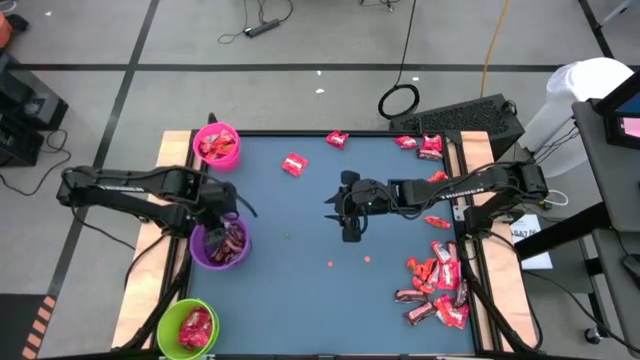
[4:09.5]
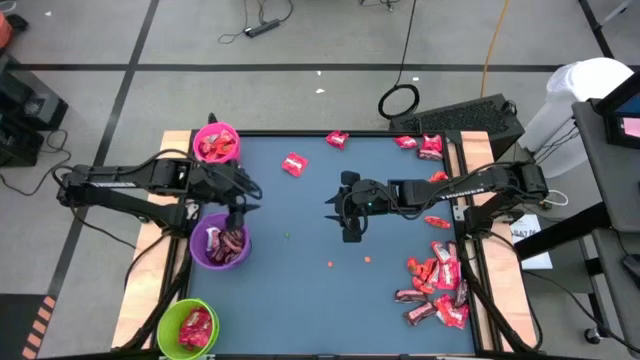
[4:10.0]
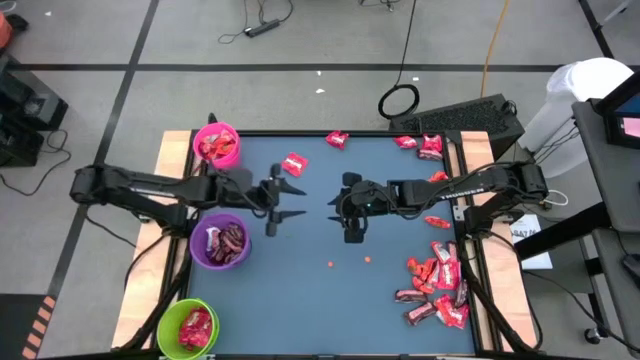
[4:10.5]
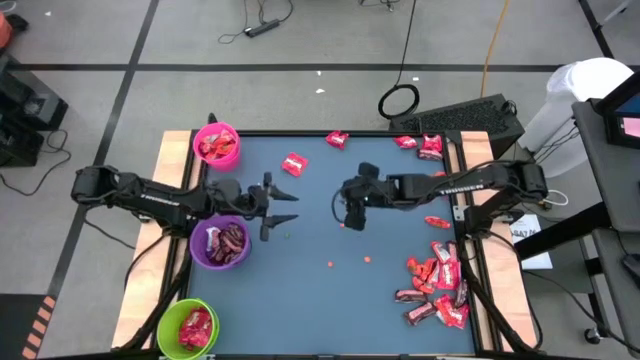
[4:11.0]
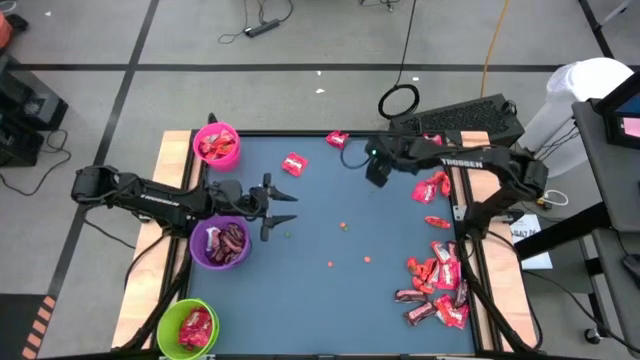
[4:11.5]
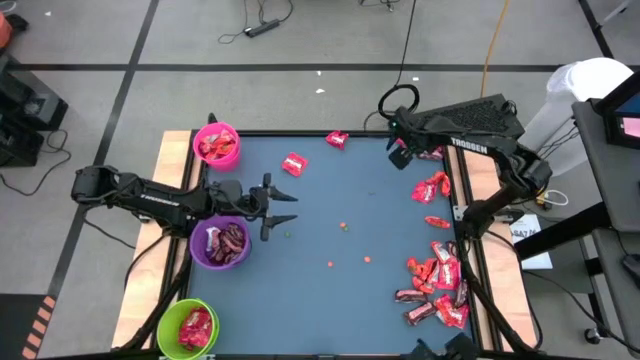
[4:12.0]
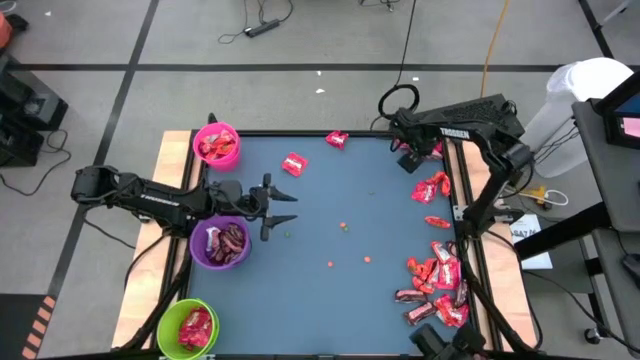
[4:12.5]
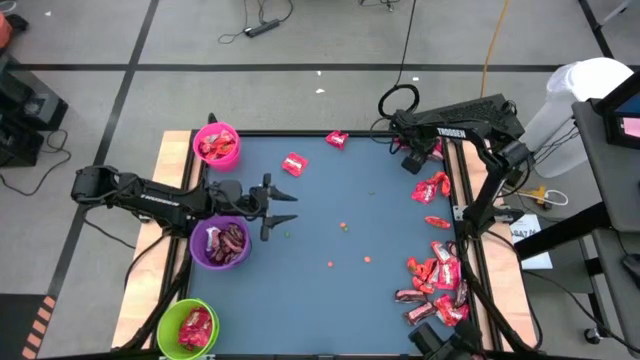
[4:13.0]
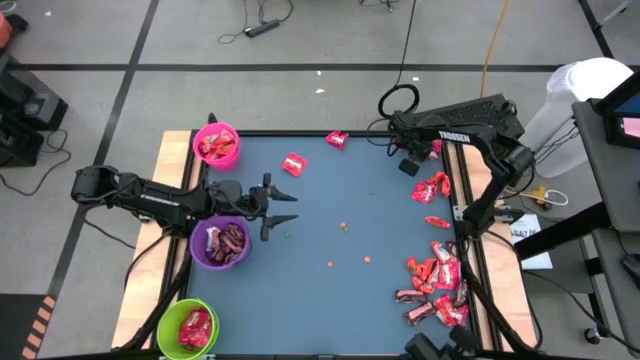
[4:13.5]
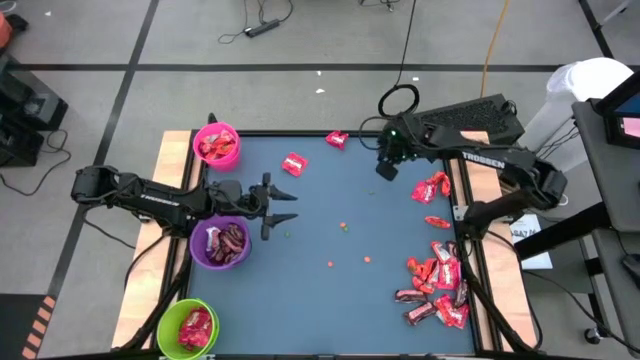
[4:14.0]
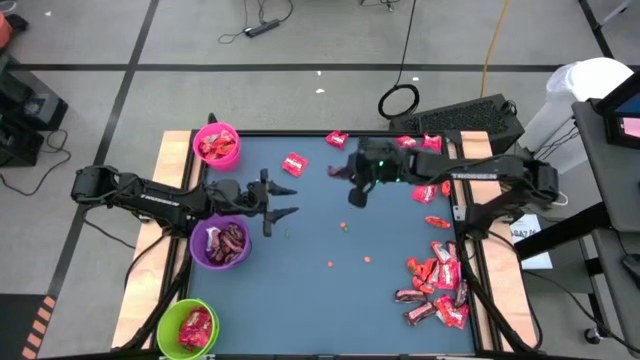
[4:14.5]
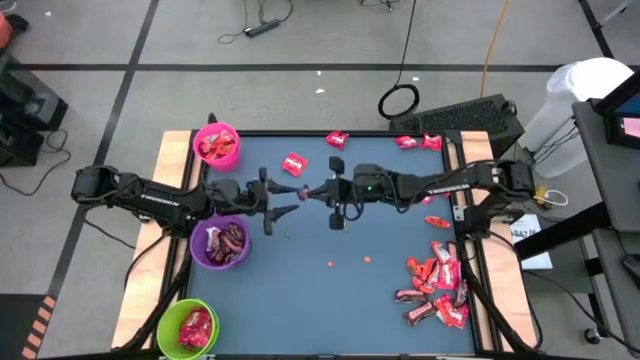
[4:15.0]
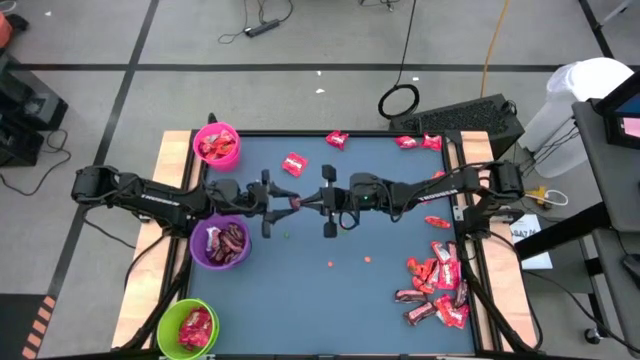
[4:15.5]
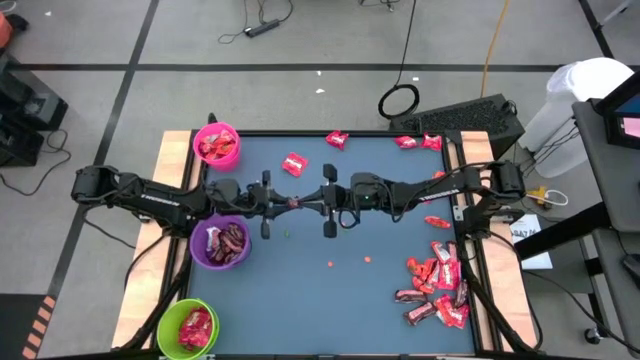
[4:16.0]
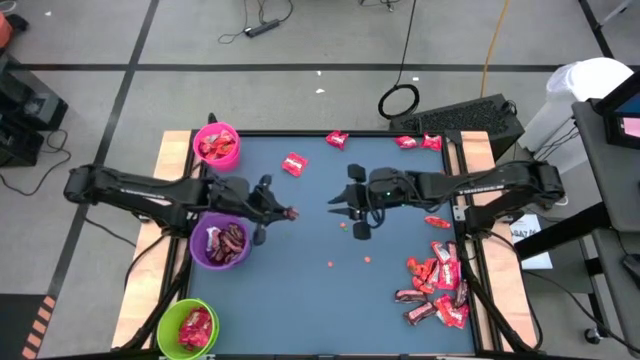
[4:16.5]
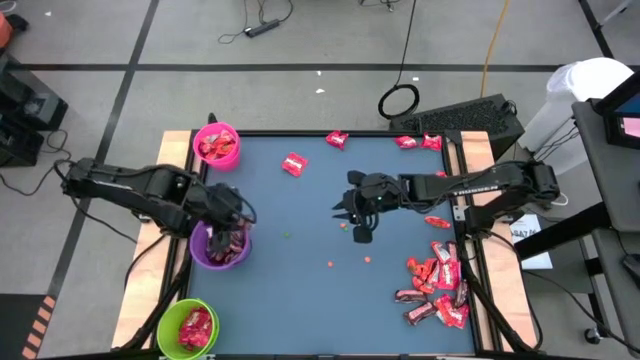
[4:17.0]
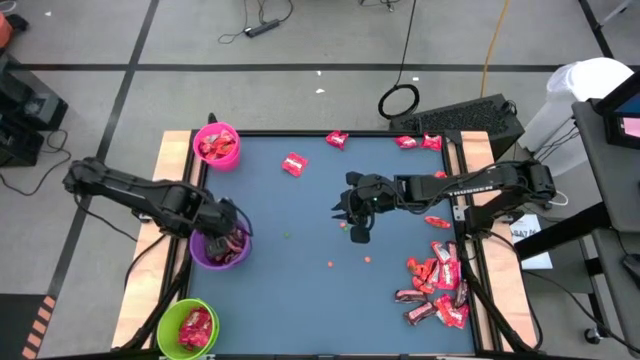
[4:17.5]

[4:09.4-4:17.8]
Task: Organize candy in baskets
Put the brown chocolate into the violet bucket

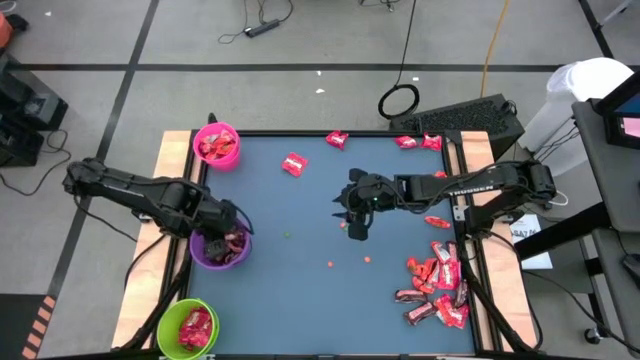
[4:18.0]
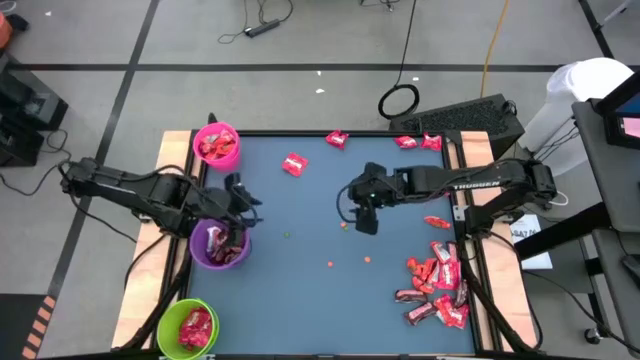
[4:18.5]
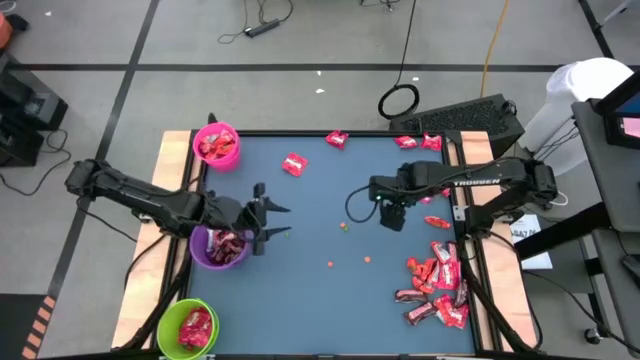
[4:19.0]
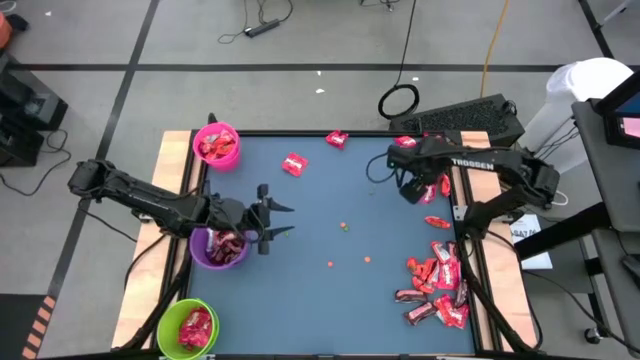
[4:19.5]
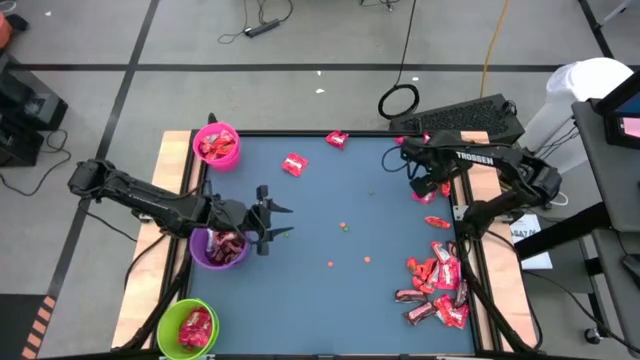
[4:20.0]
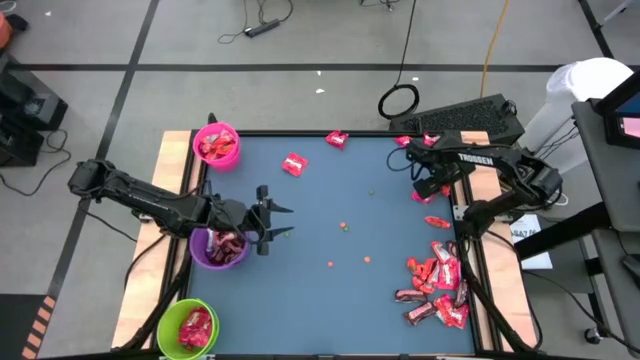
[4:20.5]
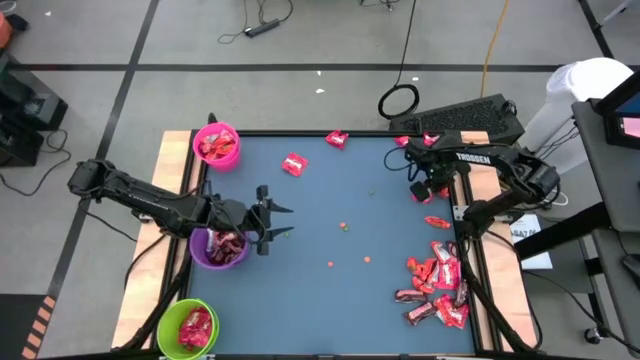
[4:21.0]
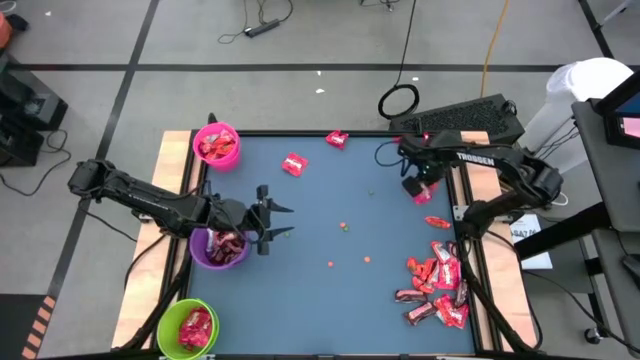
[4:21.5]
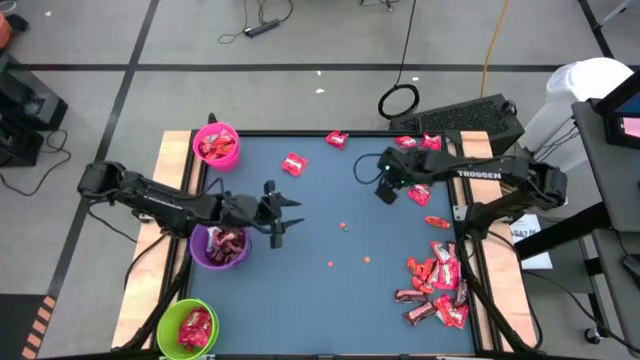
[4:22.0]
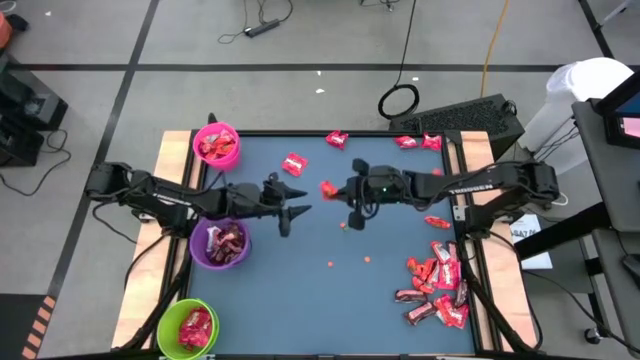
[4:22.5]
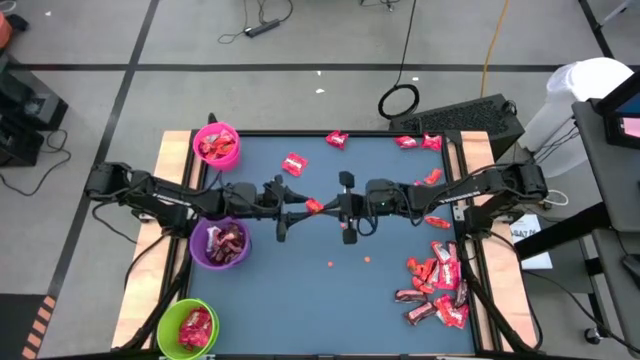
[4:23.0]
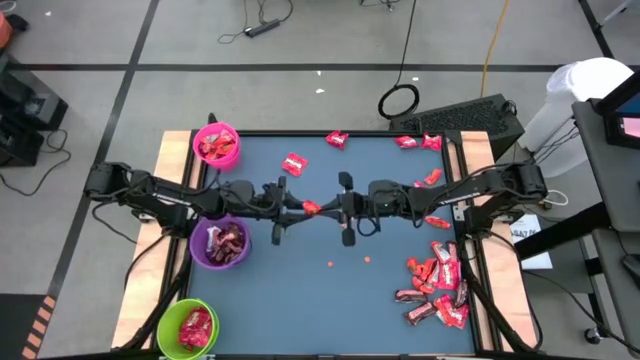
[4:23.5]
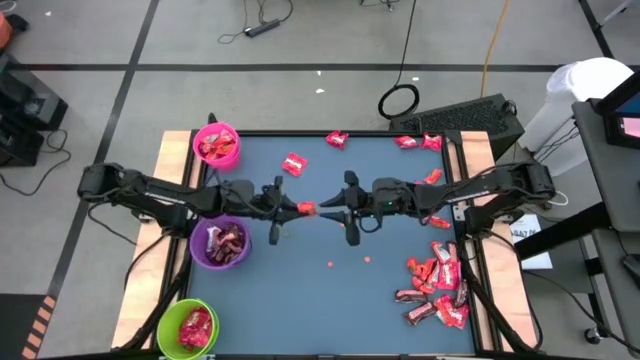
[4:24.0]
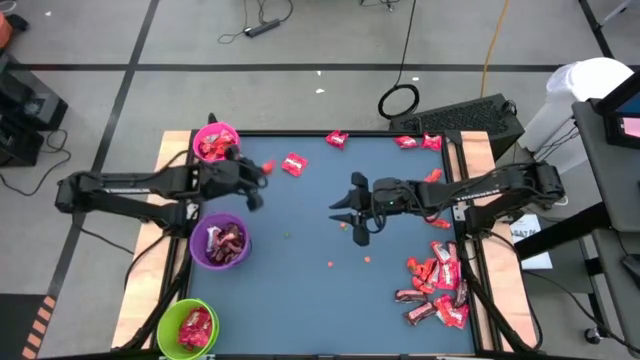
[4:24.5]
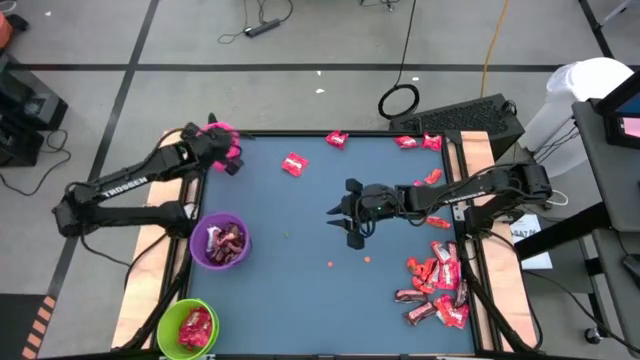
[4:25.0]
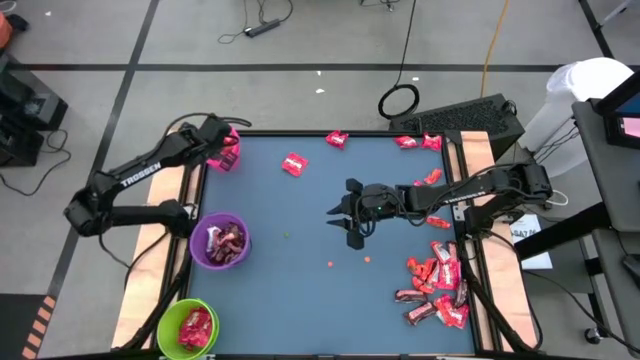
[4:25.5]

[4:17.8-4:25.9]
Put the orange chocolate into the pink bucket

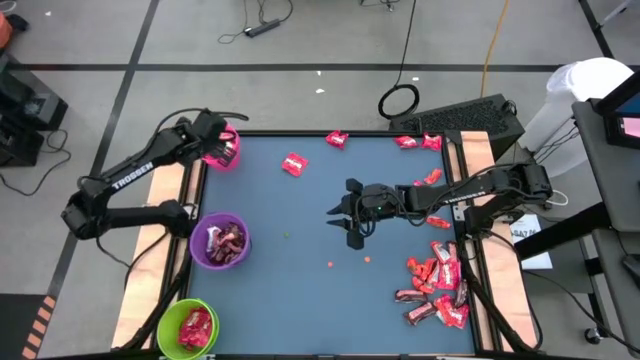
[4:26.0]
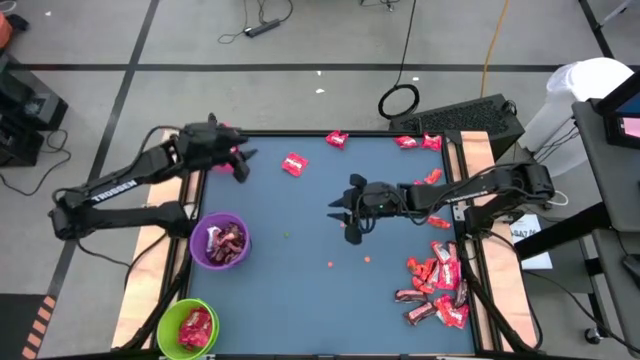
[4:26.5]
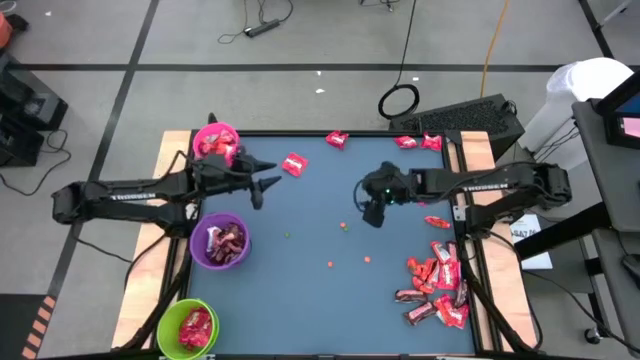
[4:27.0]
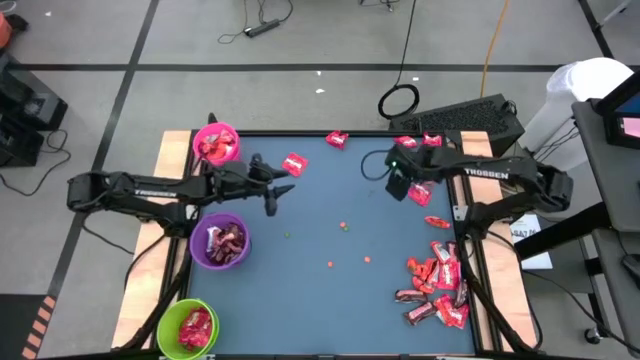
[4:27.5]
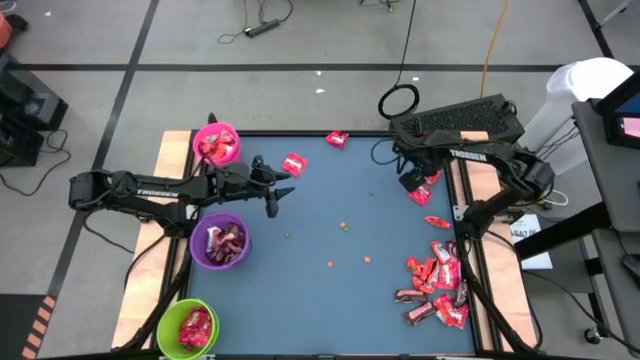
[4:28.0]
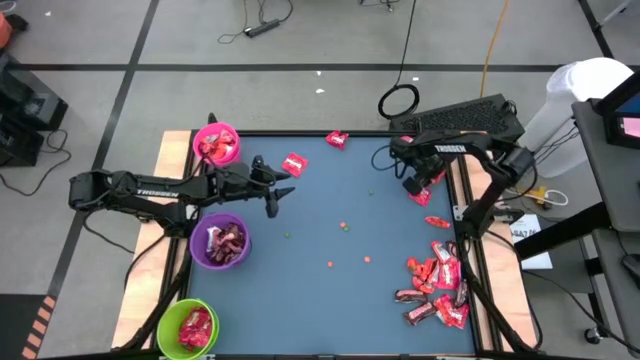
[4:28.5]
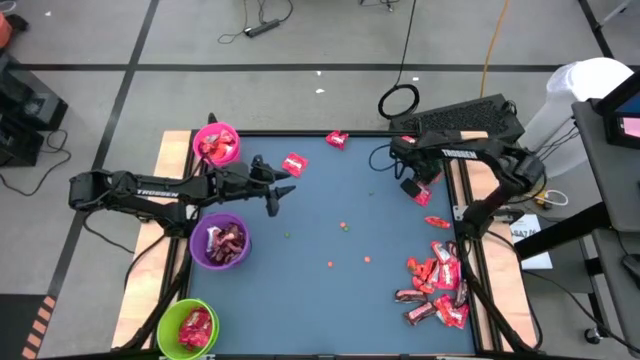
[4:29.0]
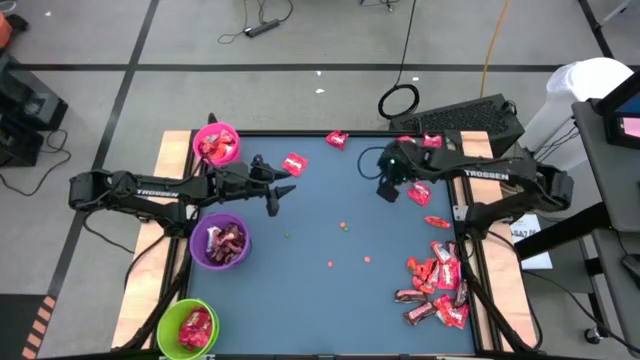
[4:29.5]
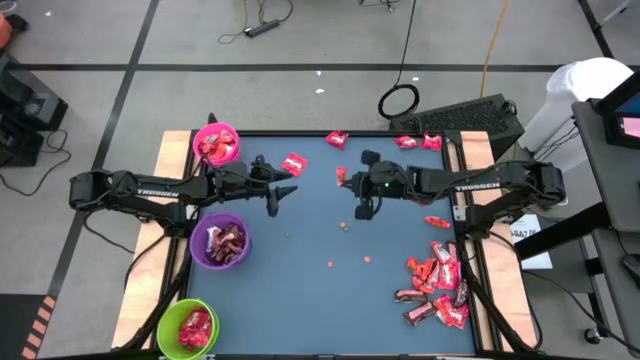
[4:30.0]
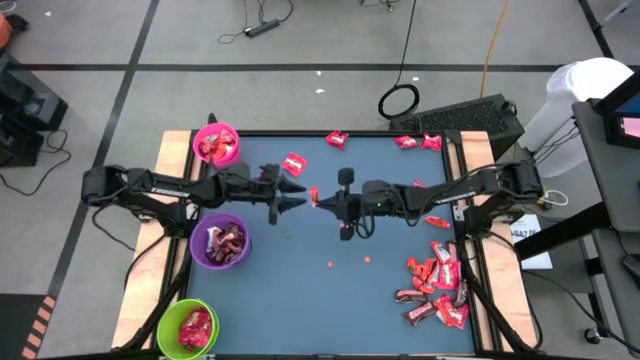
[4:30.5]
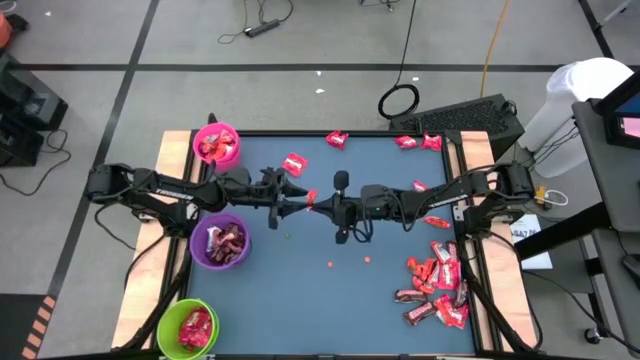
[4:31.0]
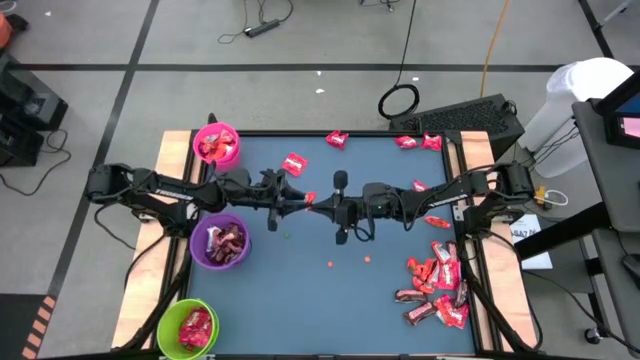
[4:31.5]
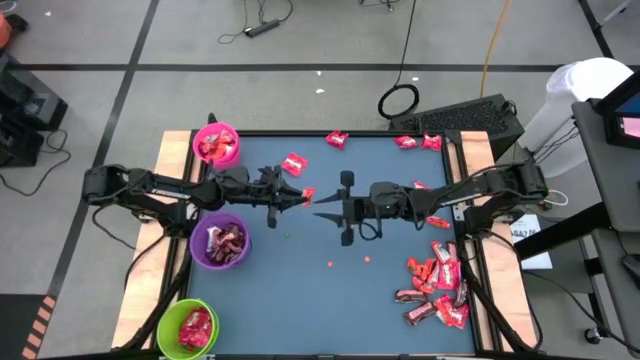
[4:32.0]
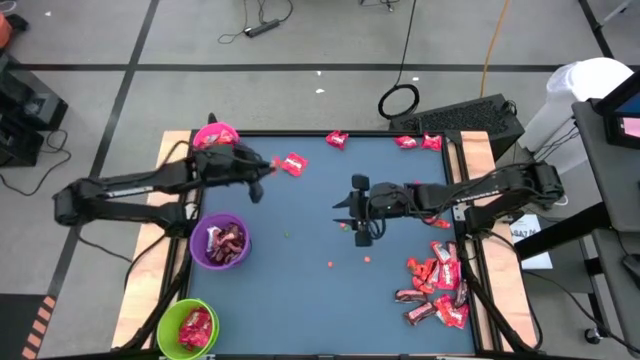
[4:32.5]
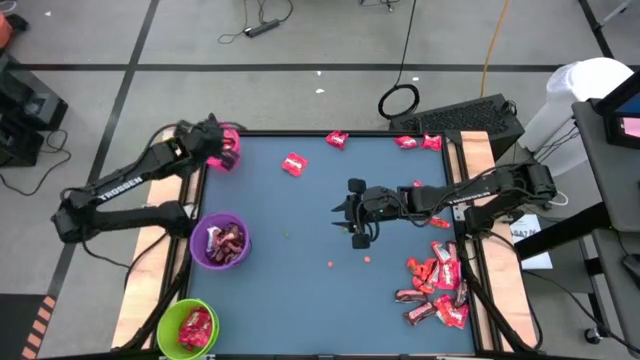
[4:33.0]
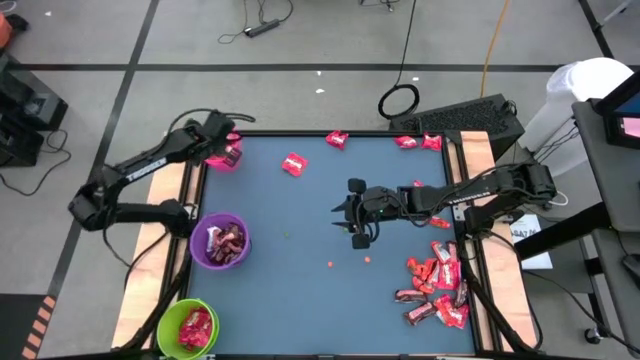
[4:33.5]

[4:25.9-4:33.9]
Put the orange chocolate into the pink bucket
